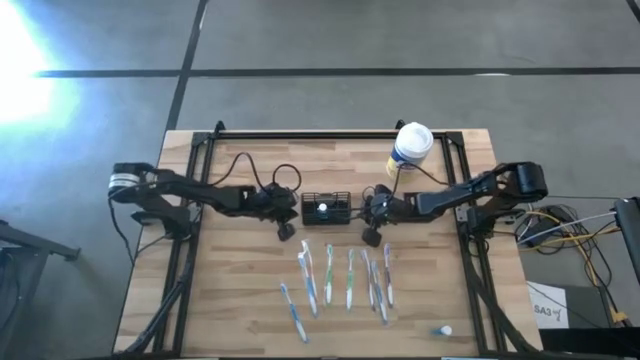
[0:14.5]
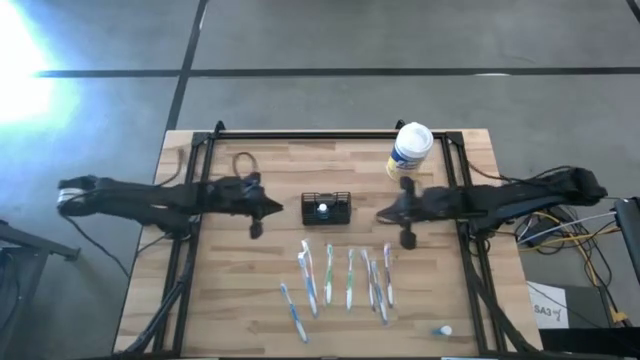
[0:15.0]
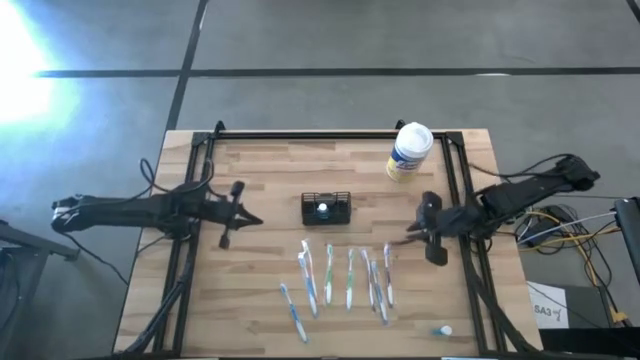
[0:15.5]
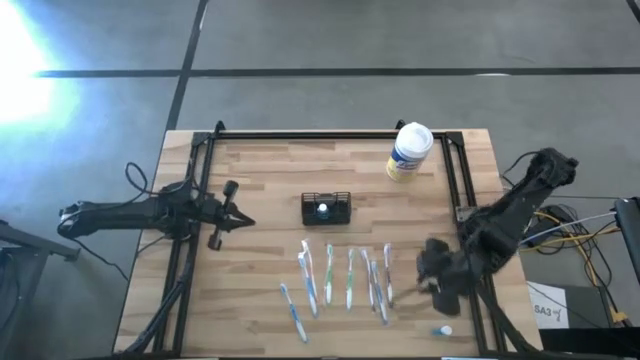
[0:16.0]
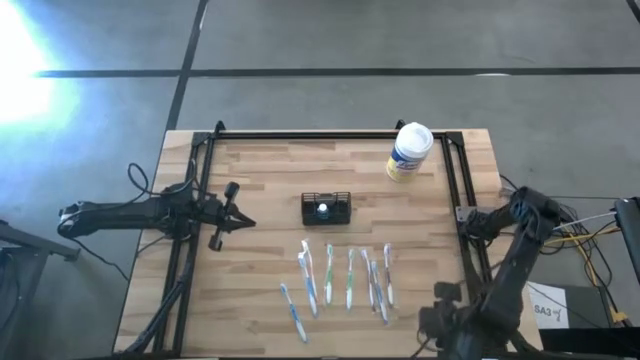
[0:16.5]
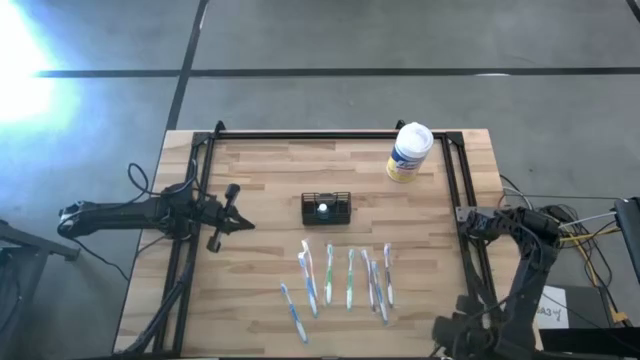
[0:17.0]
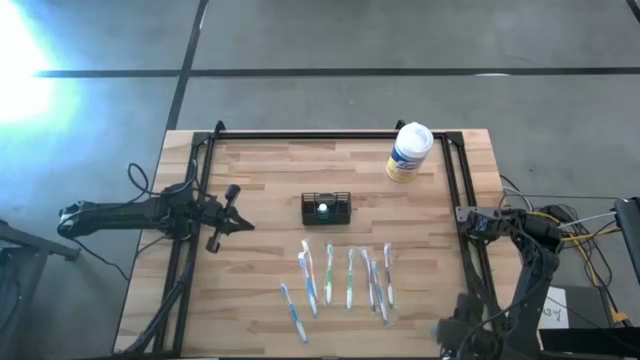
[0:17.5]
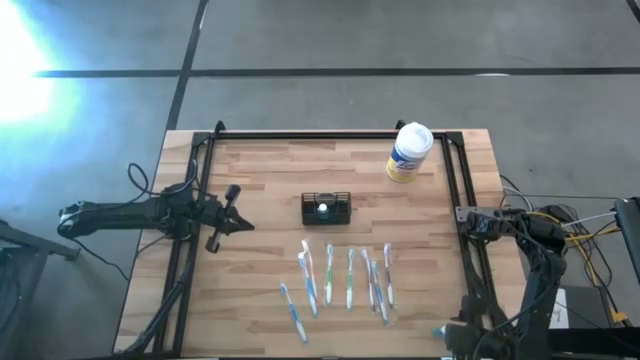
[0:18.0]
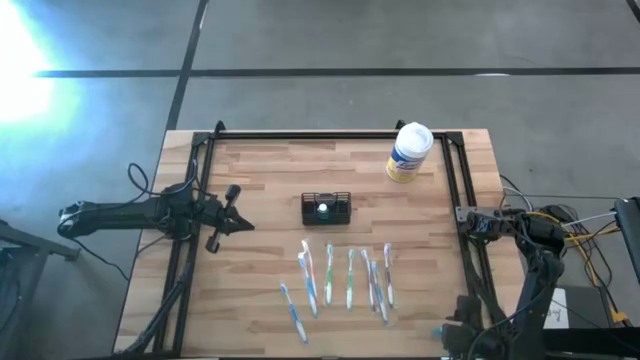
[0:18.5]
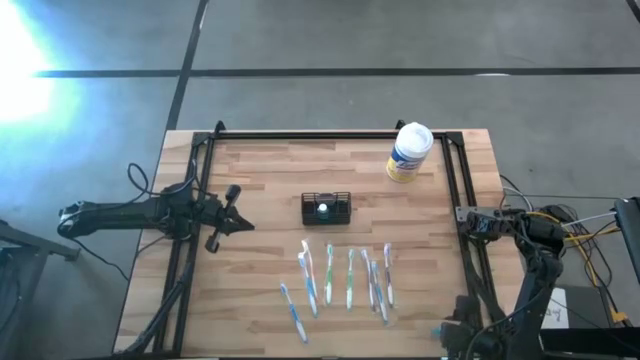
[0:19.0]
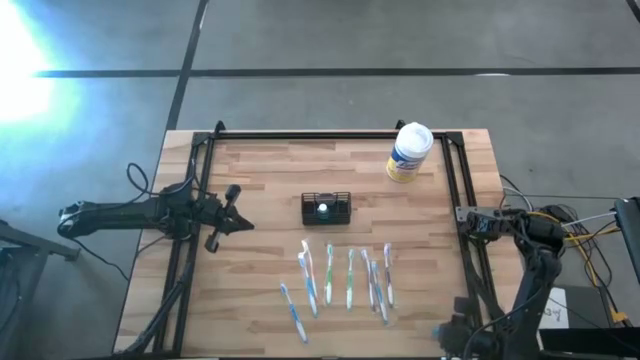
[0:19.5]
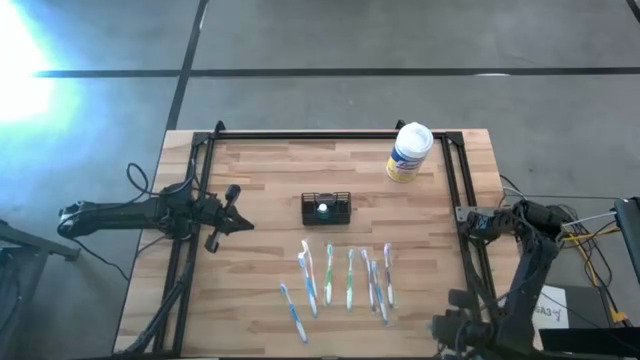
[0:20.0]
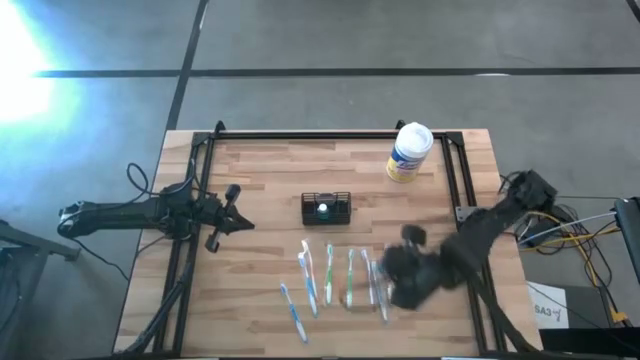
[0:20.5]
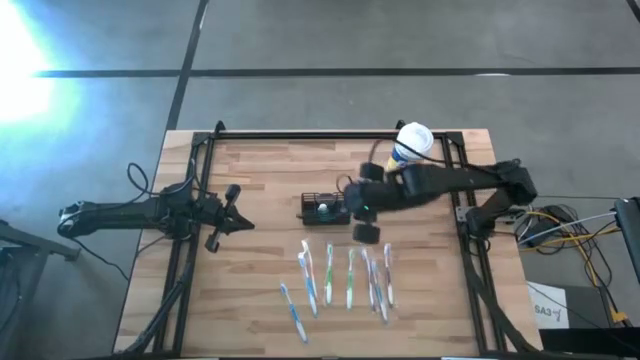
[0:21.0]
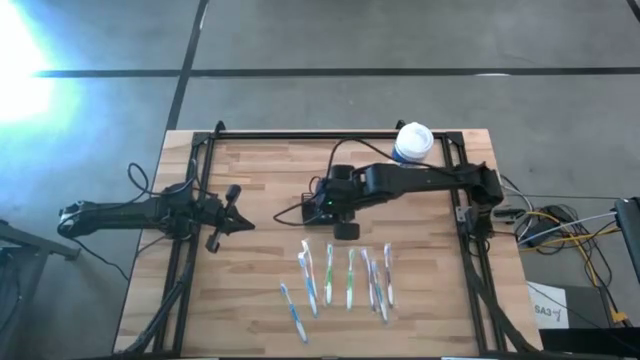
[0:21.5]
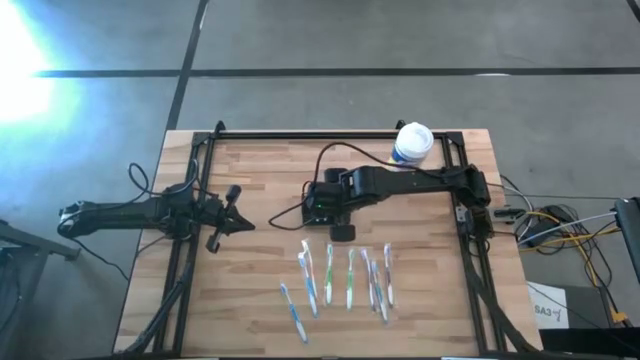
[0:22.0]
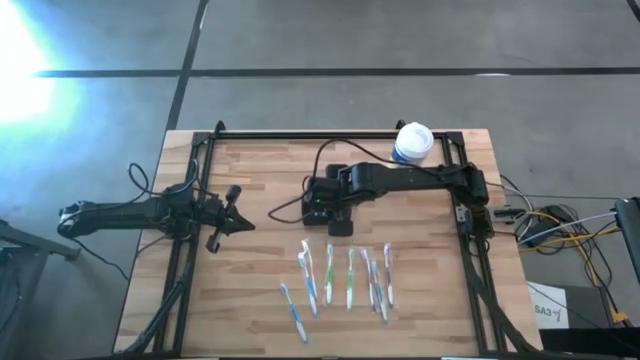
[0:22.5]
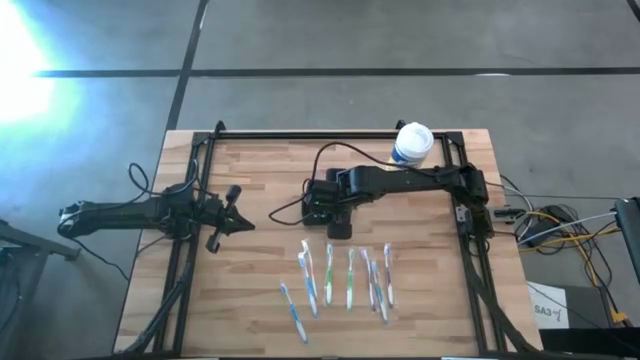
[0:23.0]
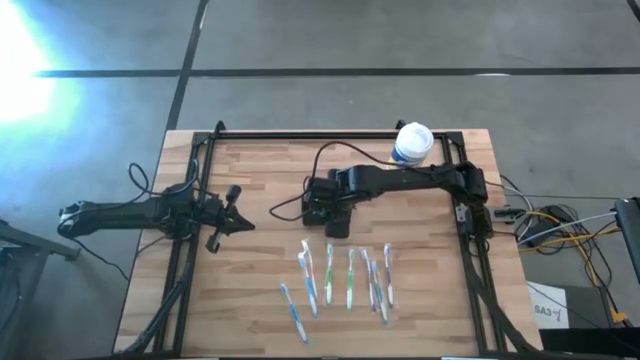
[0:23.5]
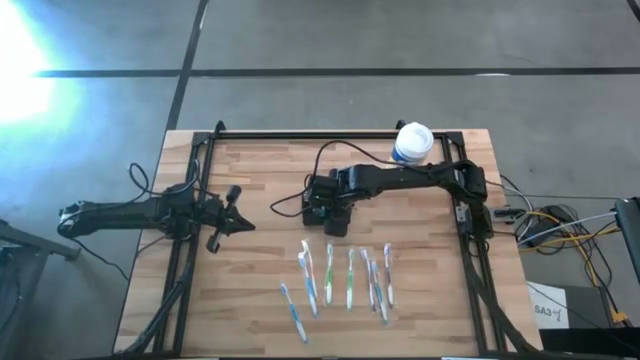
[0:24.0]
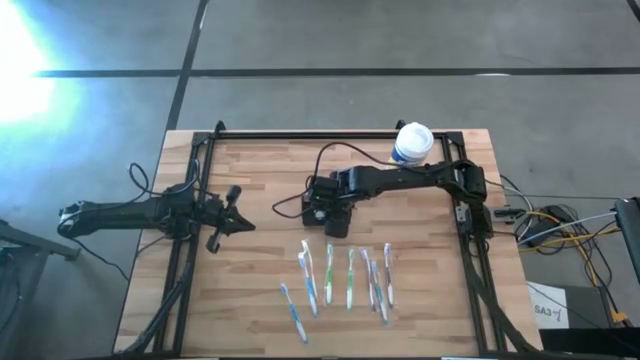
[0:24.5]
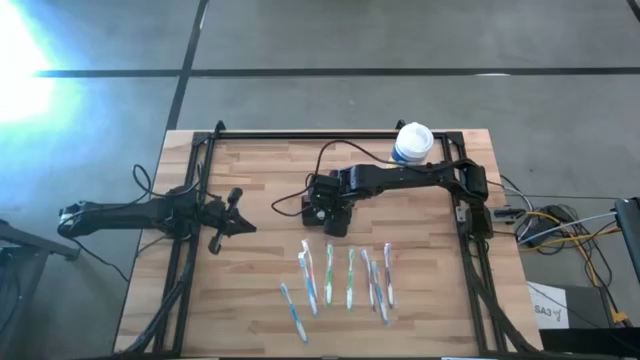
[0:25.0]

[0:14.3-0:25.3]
Task: Pick & Place toothbrushing station
Put the mouthwash bottle into the black wire organizer

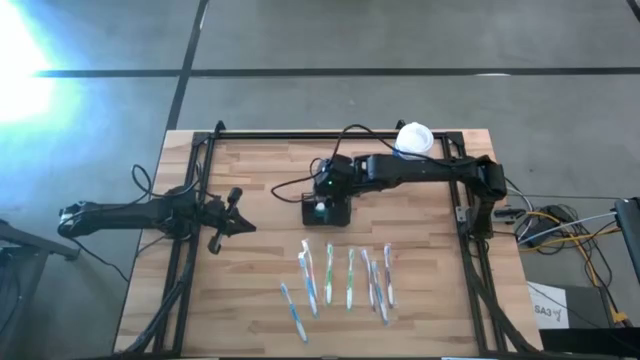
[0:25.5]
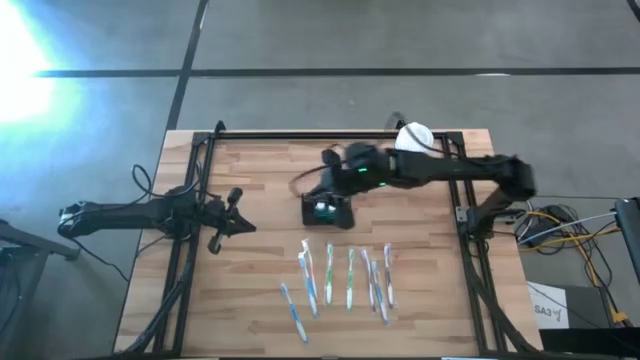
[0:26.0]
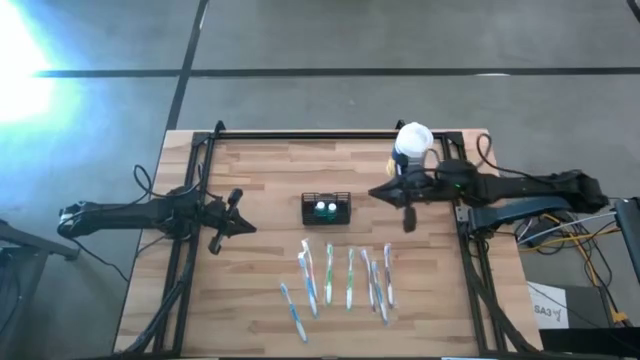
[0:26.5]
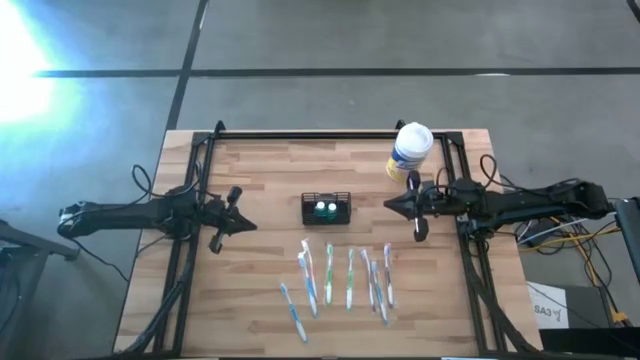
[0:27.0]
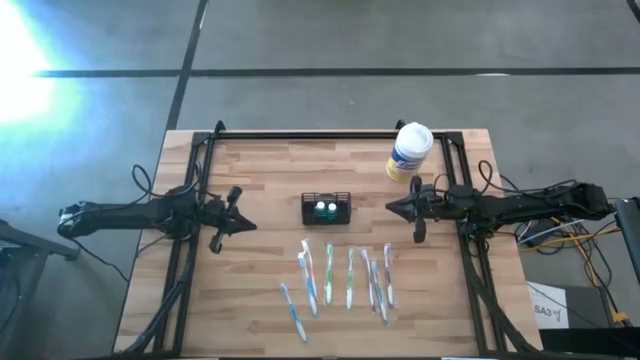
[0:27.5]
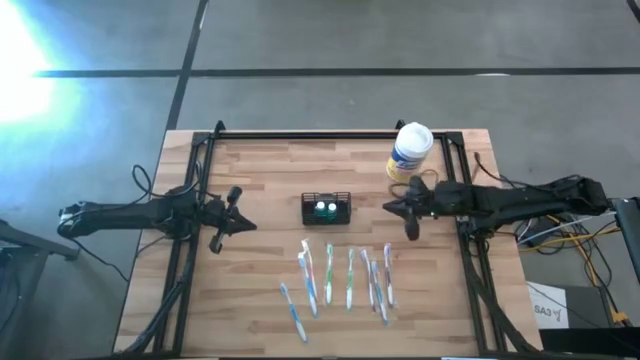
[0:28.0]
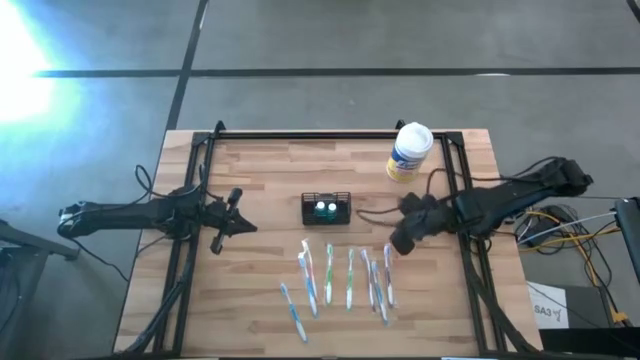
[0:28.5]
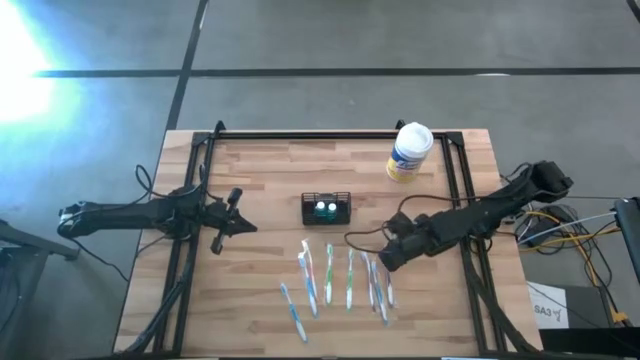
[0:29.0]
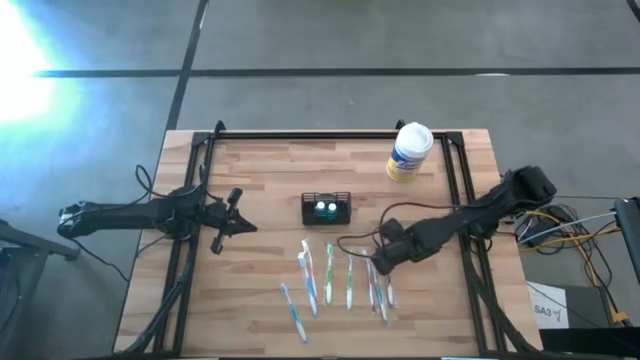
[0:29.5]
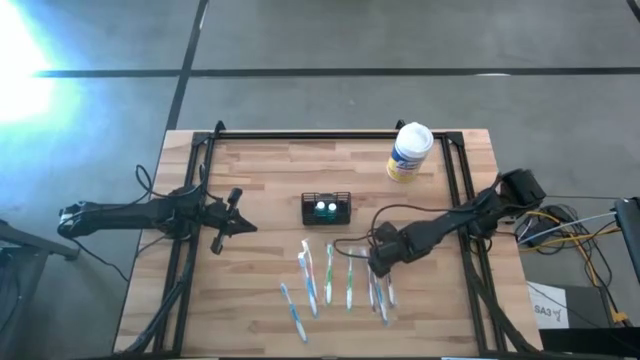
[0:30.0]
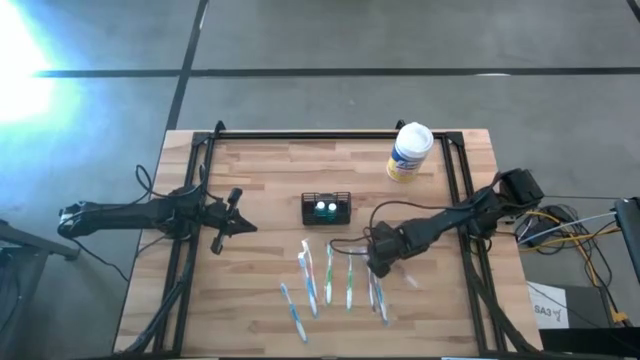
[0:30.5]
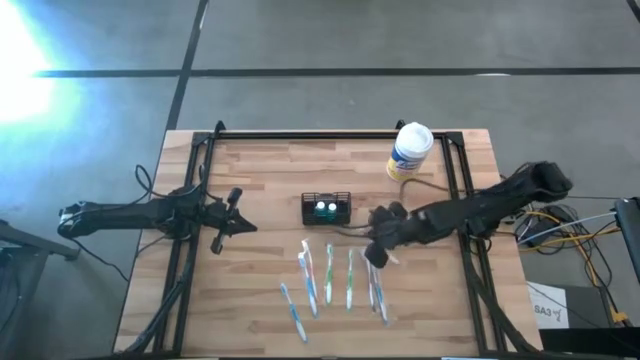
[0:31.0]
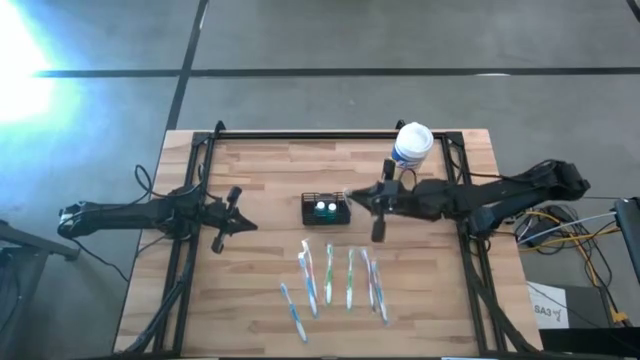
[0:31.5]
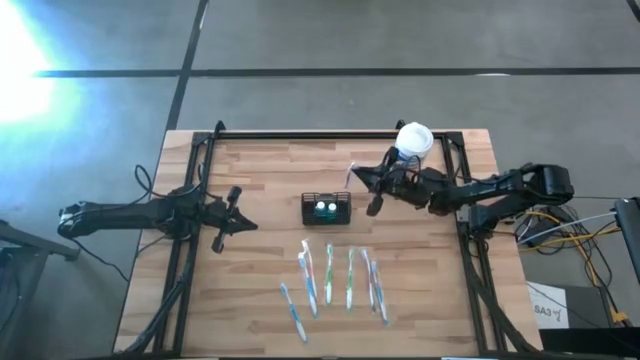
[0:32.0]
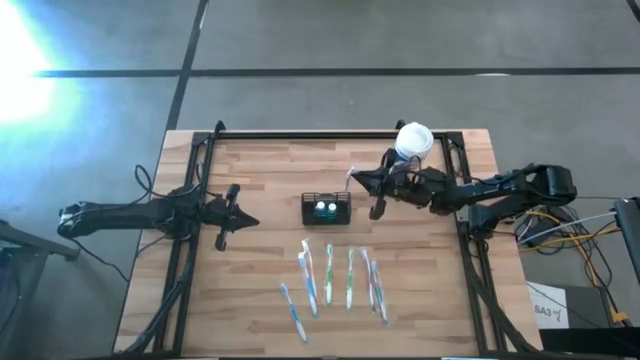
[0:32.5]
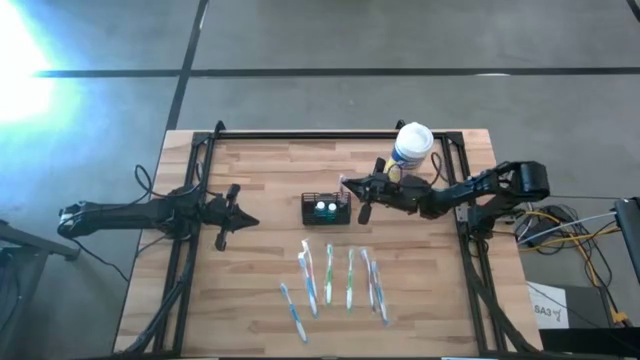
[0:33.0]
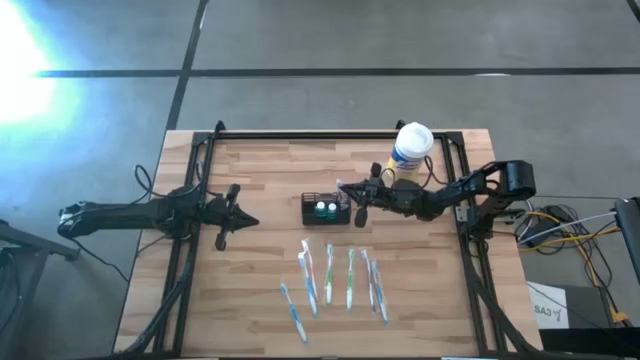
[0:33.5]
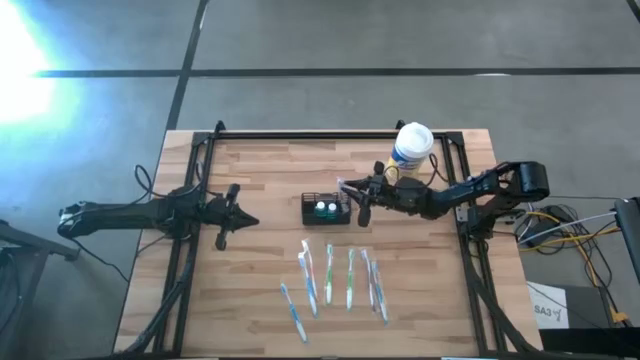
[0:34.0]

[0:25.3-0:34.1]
Put the right purple toothbrush into the black wire organizer

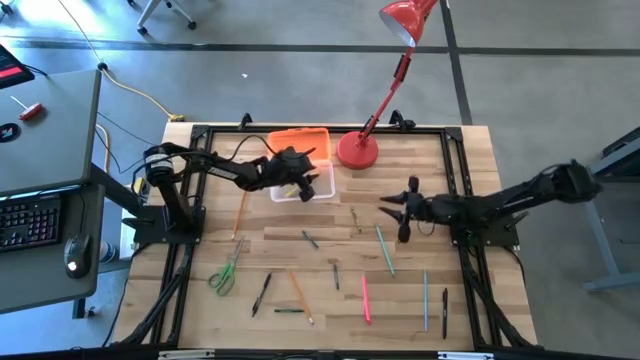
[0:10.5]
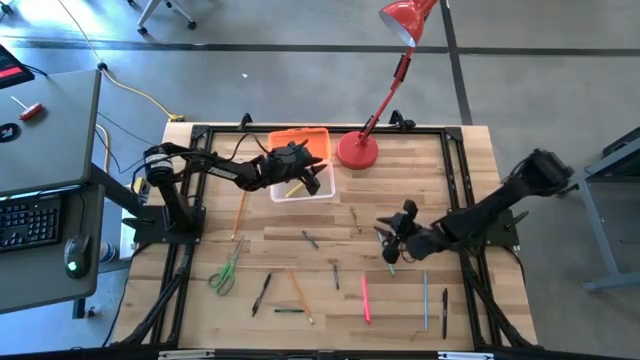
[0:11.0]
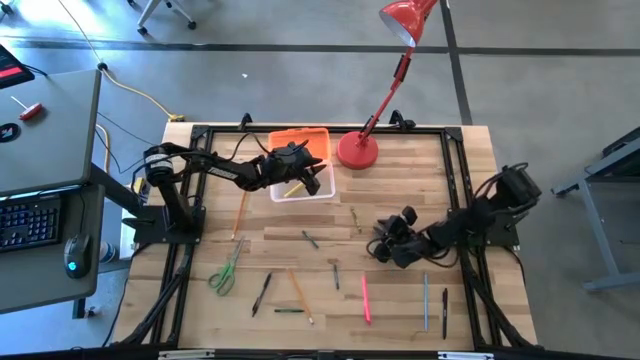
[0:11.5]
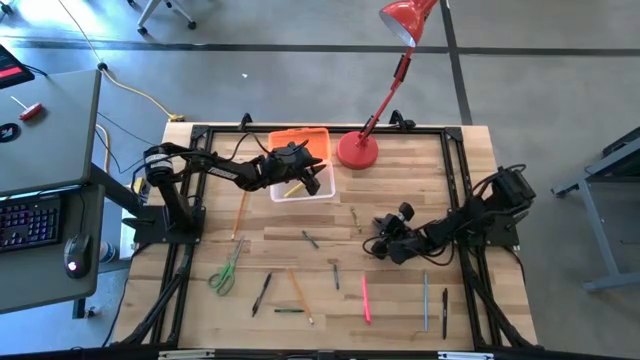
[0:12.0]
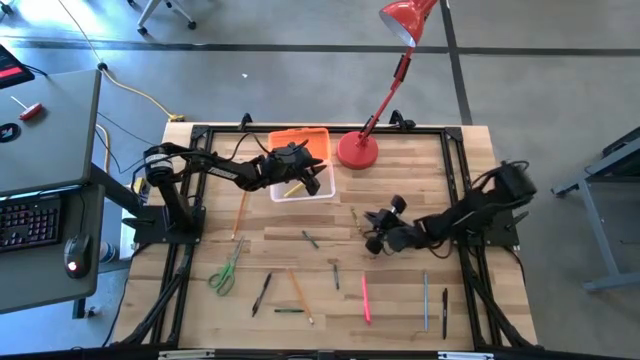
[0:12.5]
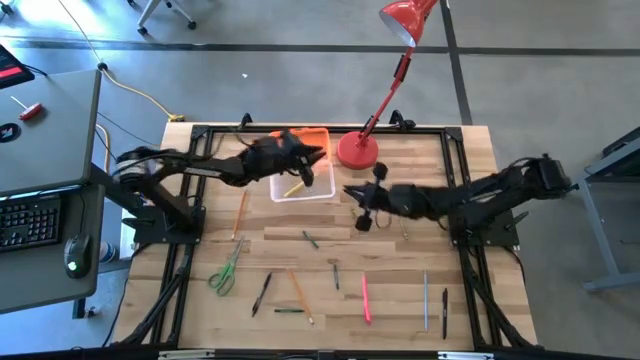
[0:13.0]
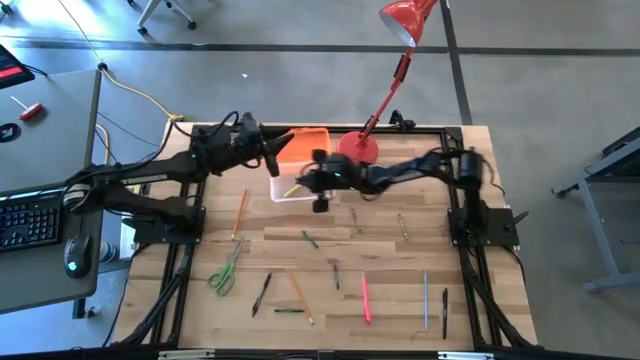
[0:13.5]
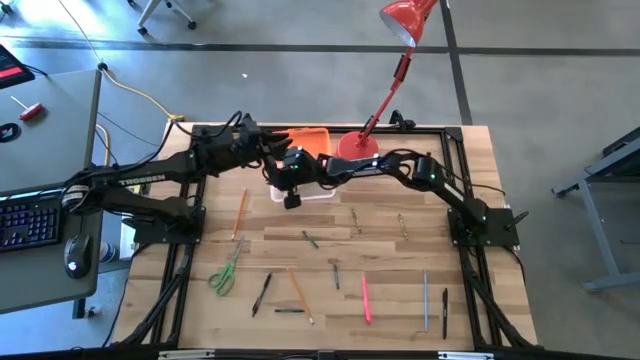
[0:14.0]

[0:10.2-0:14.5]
Task: Pick & place school supplies into a supply box
Put the light blue pencil into the orange supply box
